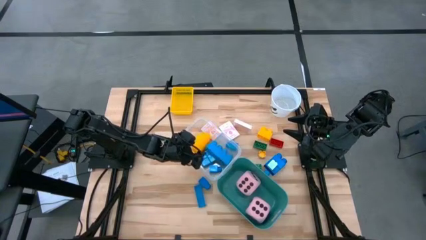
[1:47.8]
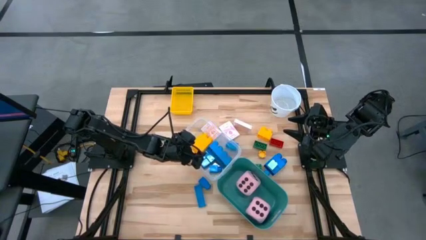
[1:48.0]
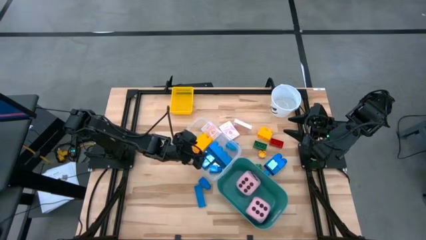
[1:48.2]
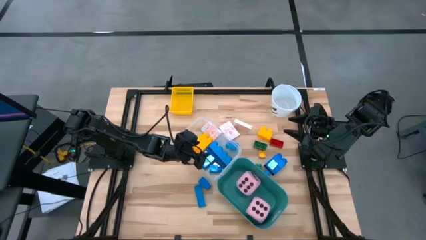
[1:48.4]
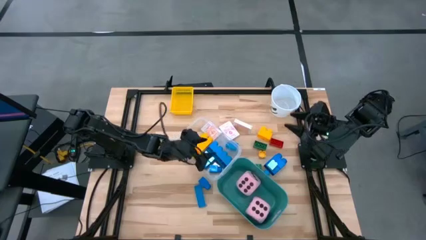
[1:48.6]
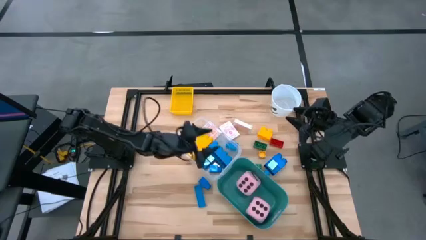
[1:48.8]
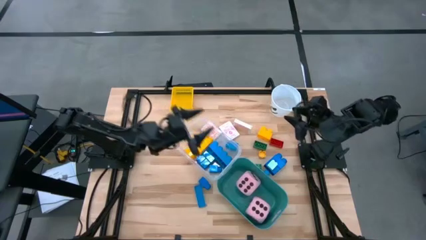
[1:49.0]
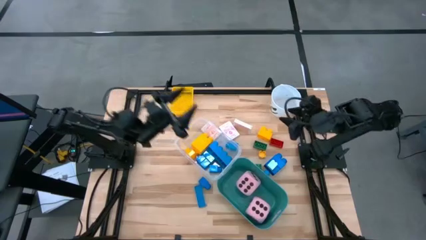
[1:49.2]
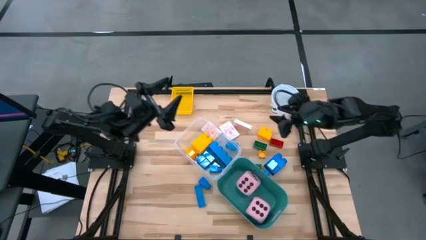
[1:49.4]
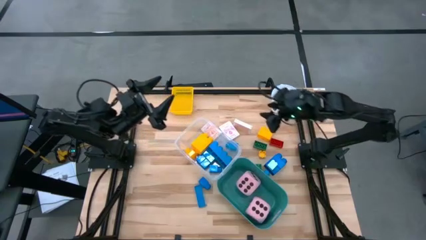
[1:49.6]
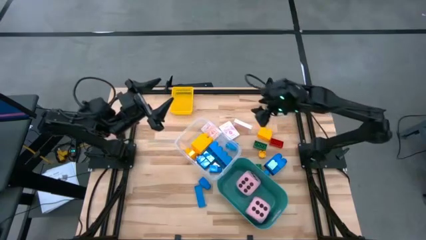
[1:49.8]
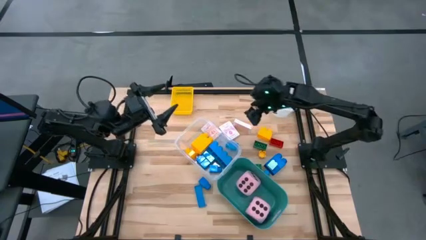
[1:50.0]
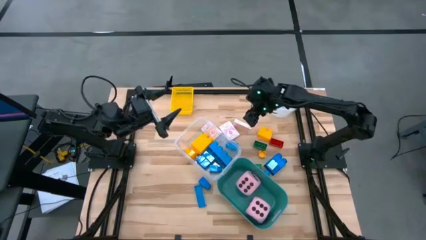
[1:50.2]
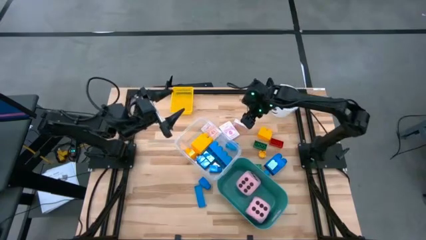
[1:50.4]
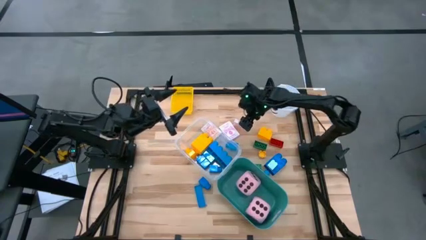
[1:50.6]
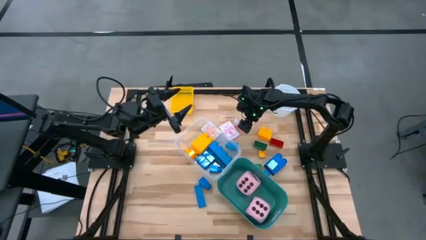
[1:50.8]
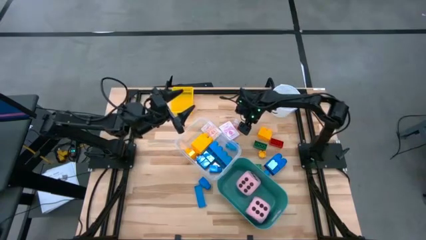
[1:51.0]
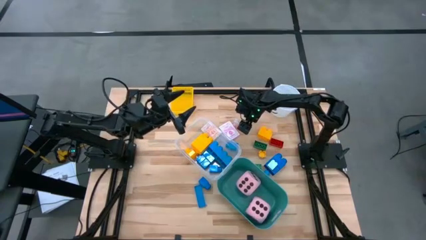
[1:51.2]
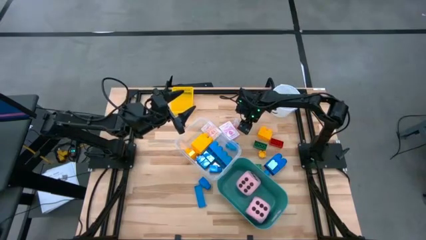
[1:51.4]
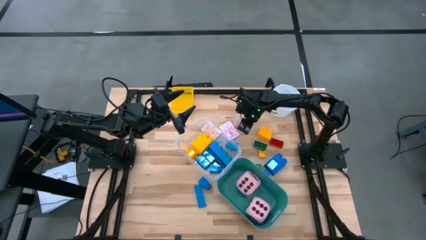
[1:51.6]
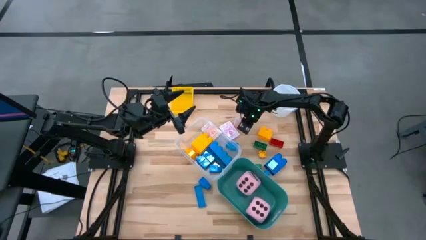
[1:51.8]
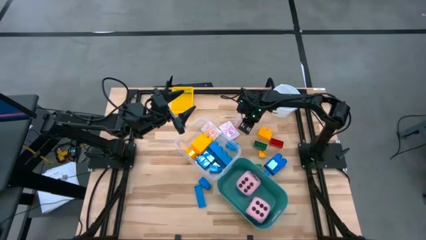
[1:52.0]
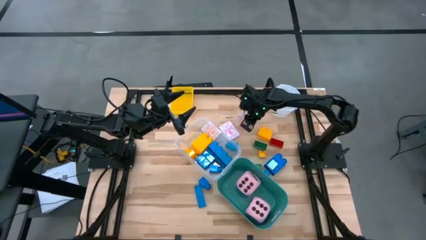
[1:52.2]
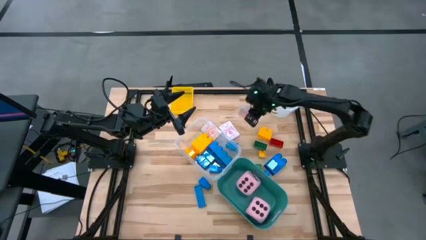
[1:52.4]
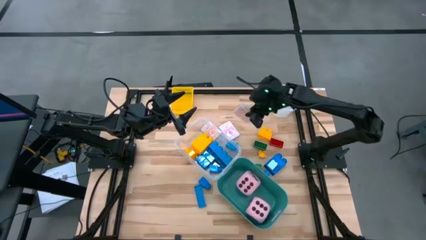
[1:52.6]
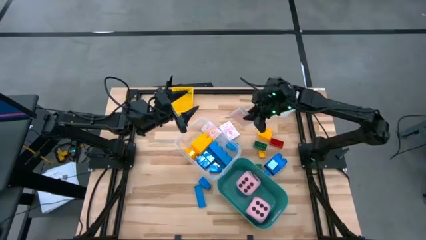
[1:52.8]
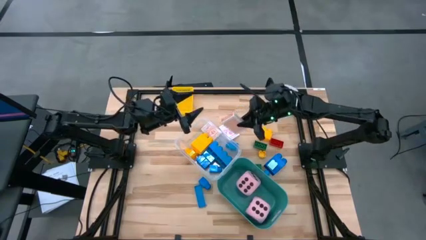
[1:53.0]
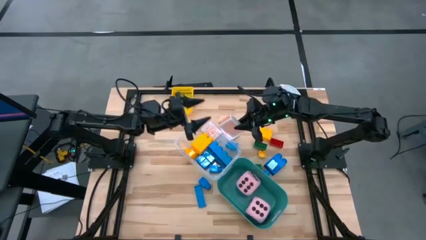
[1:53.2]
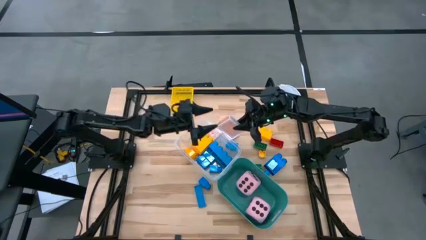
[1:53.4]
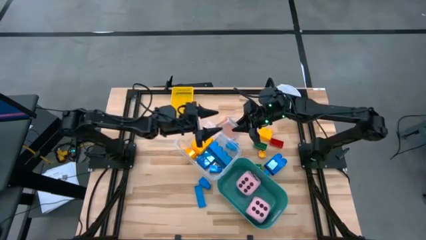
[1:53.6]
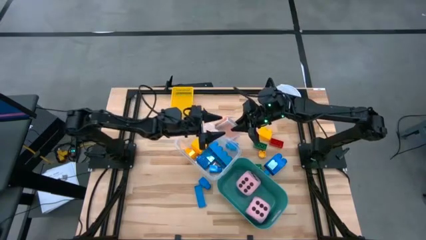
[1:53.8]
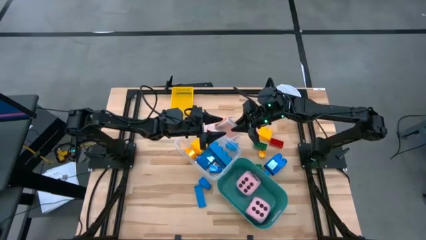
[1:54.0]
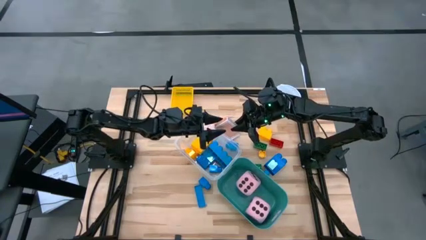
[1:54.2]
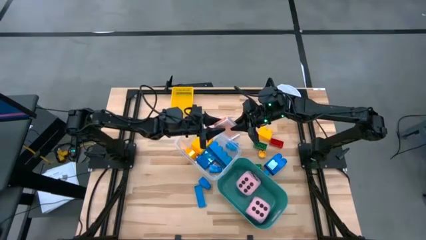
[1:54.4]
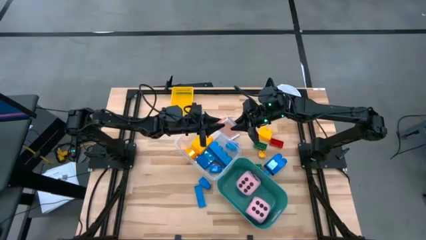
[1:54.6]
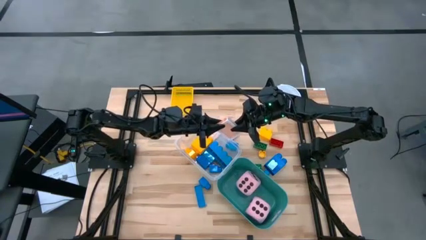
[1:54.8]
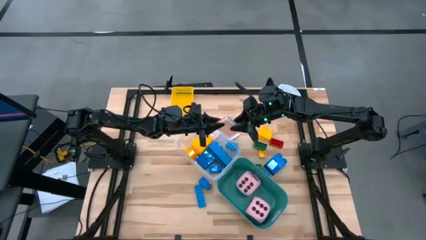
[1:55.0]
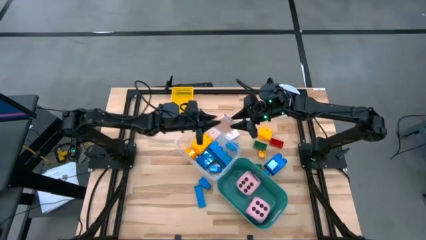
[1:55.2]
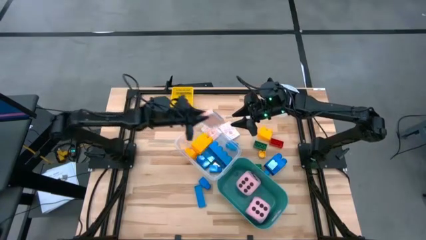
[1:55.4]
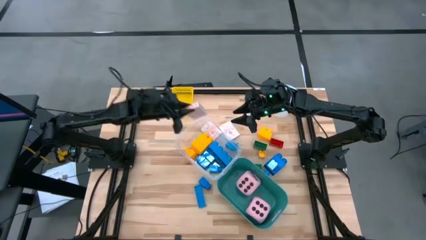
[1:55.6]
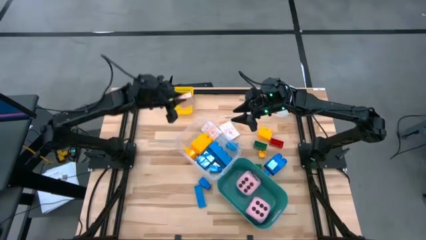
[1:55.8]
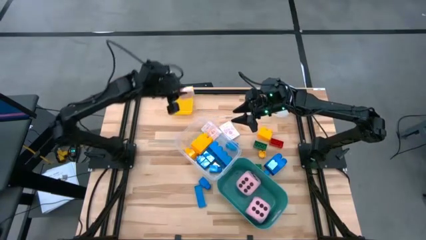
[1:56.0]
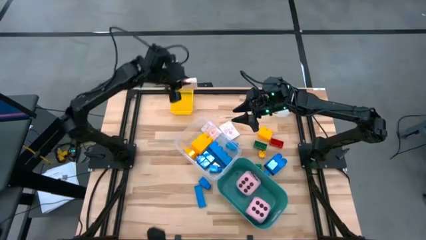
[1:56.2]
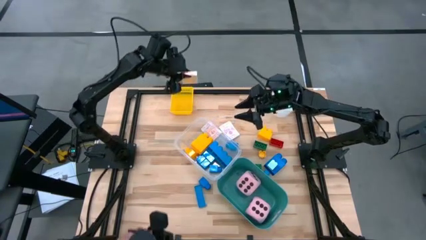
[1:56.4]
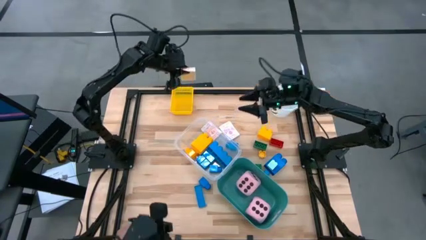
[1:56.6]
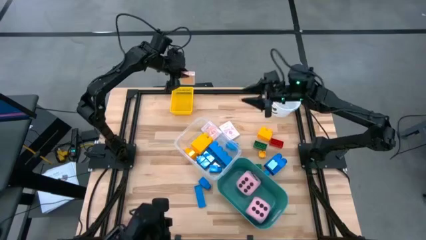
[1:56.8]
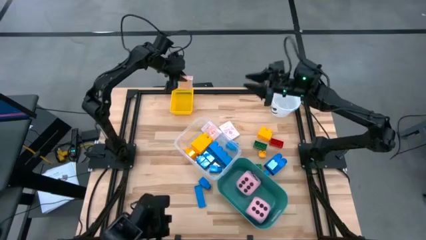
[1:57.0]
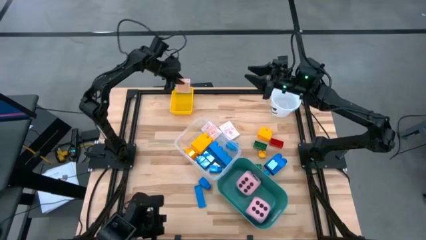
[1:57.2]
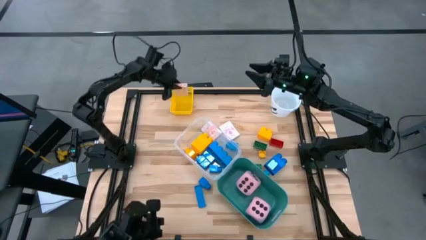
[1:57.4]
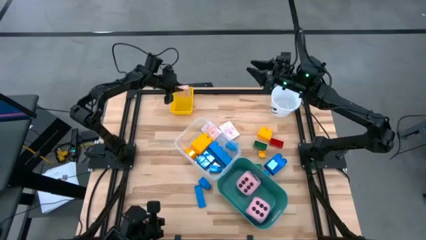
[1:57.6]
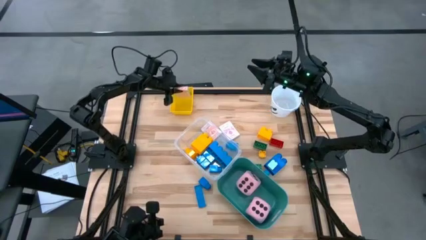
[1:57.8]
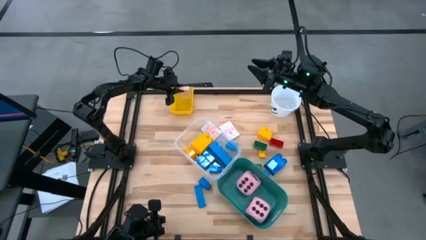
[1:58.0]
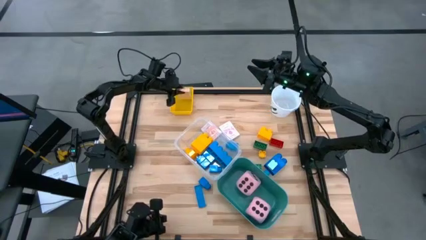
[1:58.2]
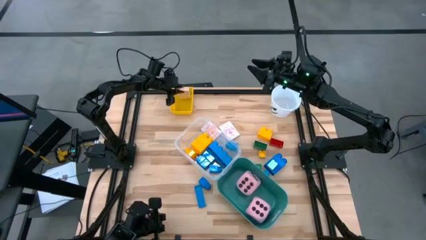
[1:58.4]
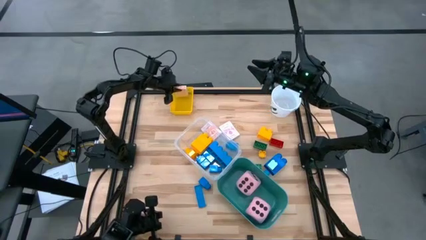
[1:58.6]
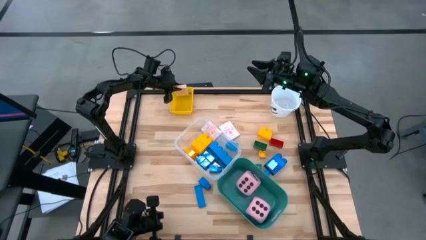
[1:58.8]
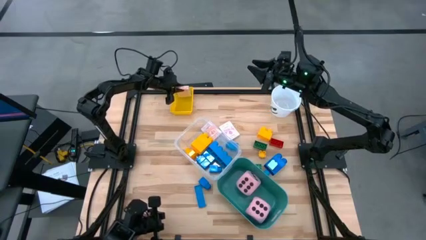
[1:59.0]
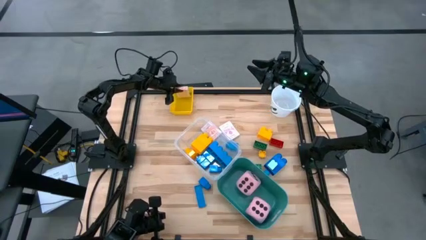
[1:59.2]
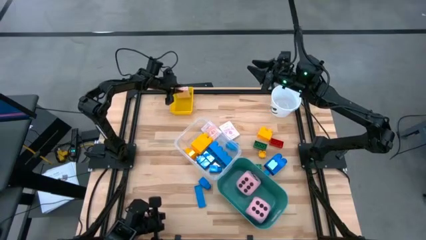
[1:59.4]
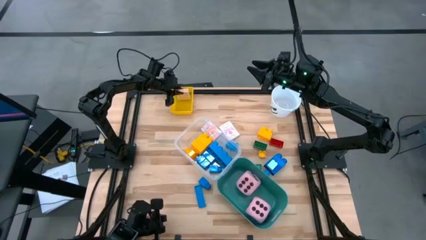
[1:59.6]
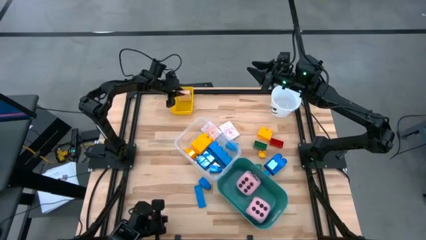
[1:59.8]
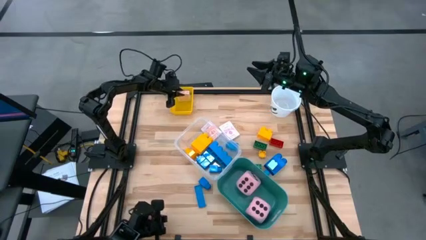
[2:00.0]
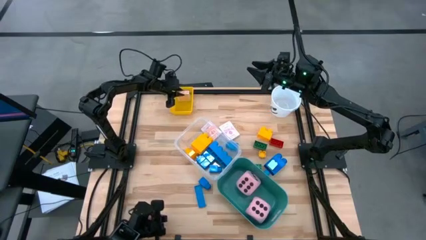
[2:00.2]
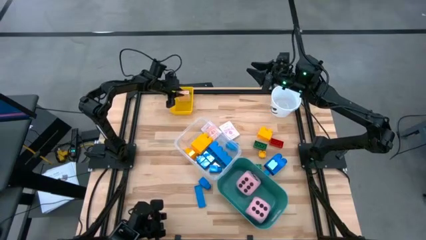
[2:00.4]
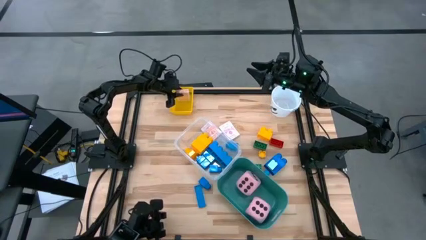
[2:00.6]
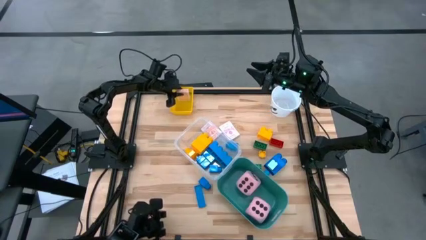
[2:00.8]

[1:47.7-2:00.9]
Task: Pick & Place Toys
Put the orange deck of cards into the yellow bin
